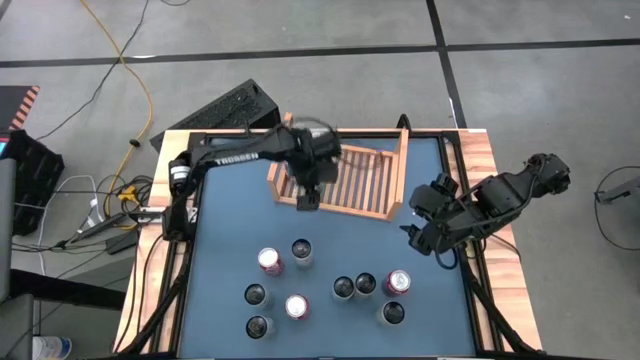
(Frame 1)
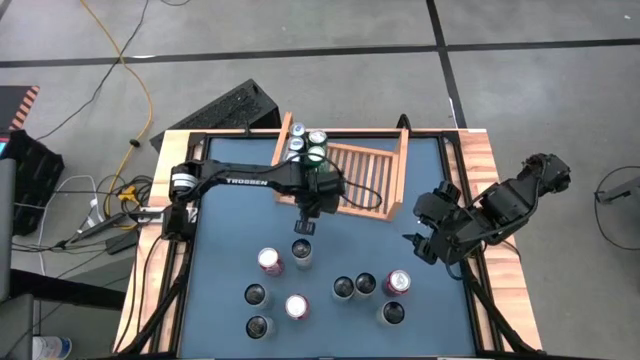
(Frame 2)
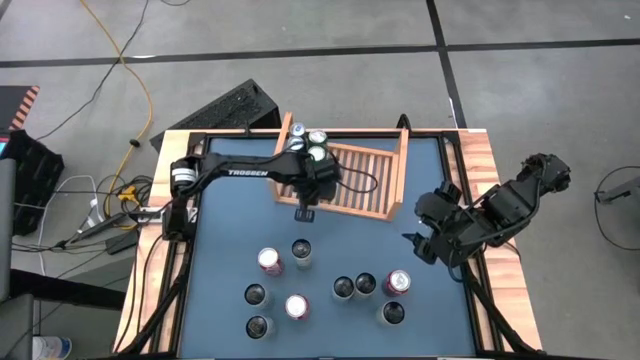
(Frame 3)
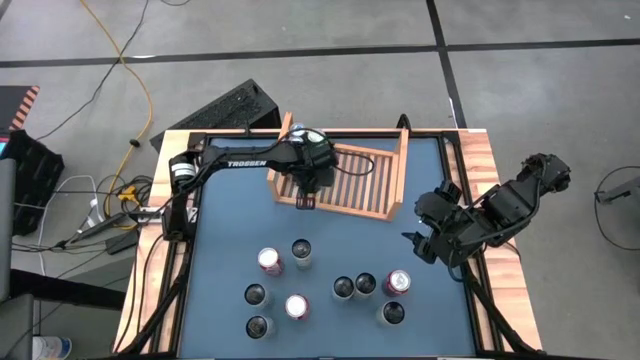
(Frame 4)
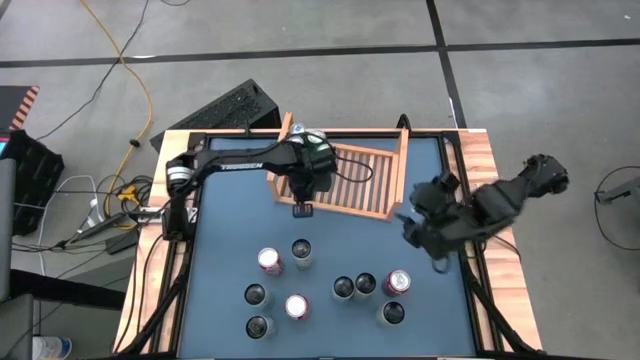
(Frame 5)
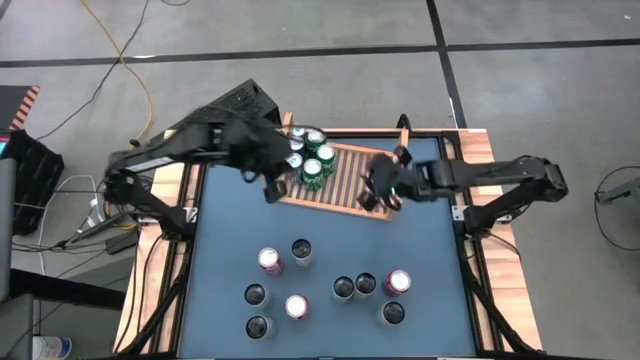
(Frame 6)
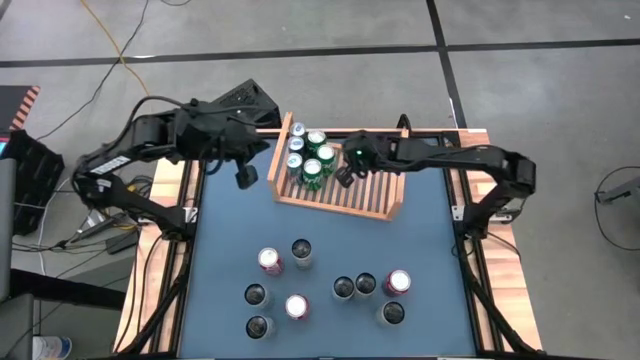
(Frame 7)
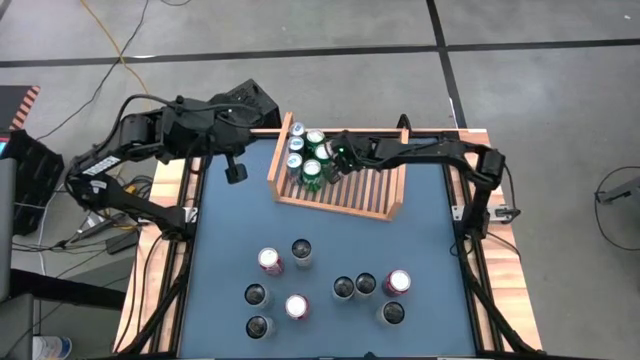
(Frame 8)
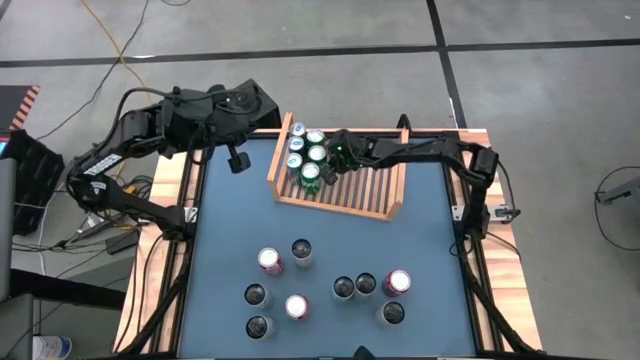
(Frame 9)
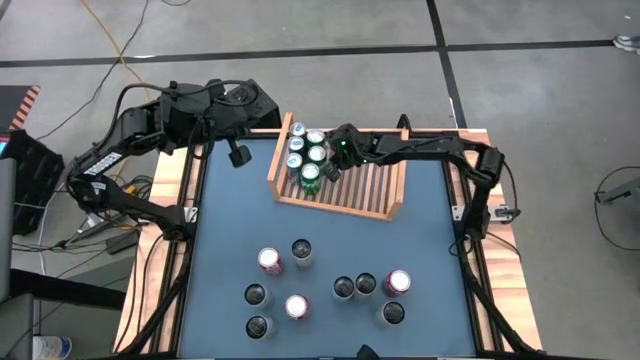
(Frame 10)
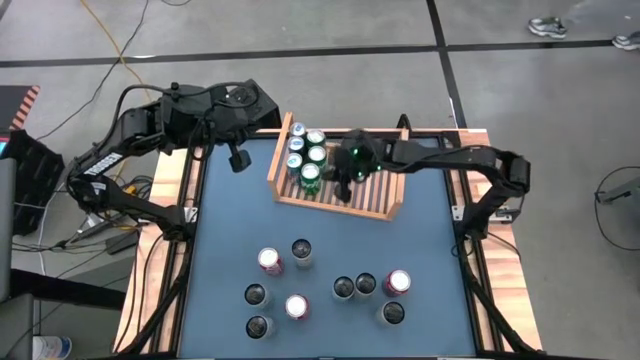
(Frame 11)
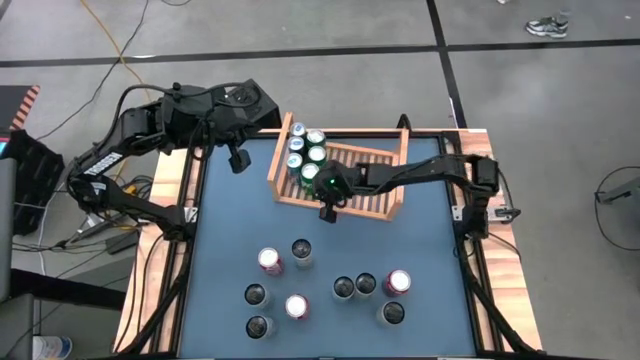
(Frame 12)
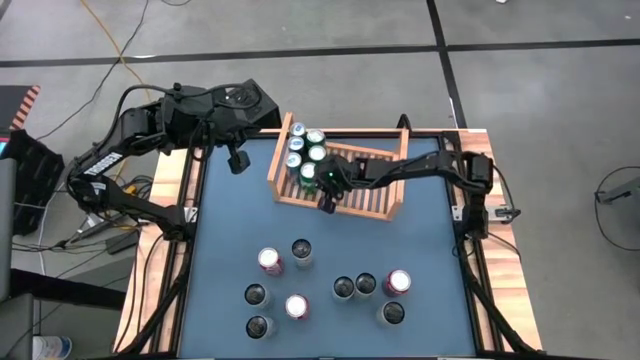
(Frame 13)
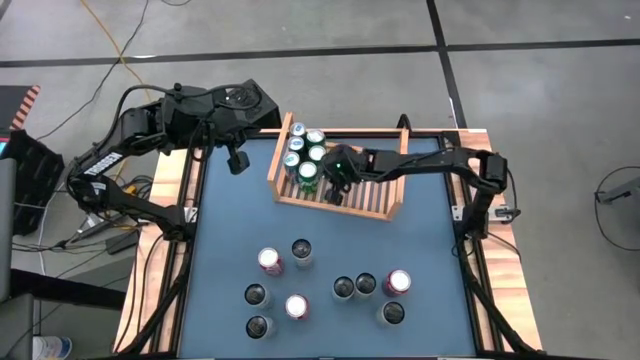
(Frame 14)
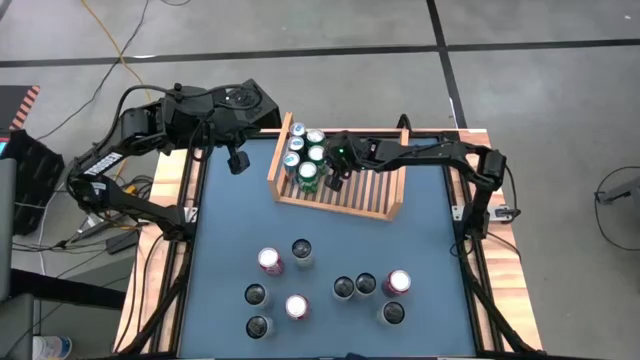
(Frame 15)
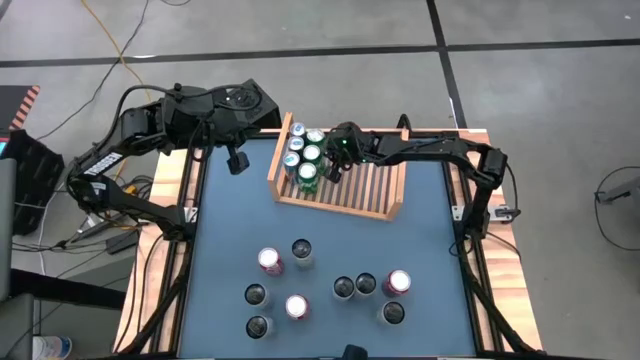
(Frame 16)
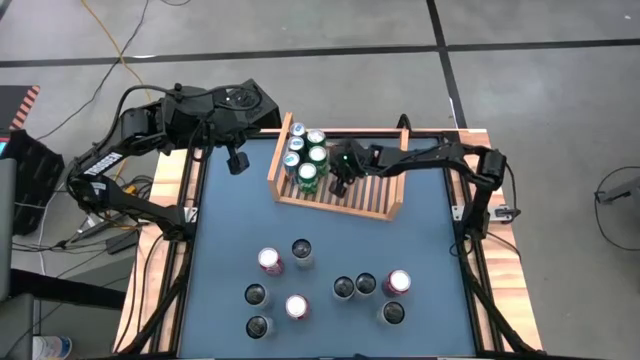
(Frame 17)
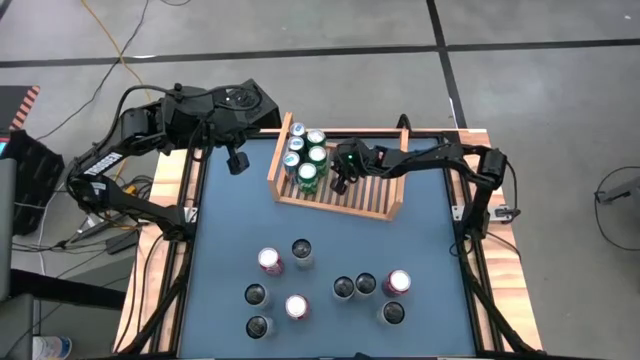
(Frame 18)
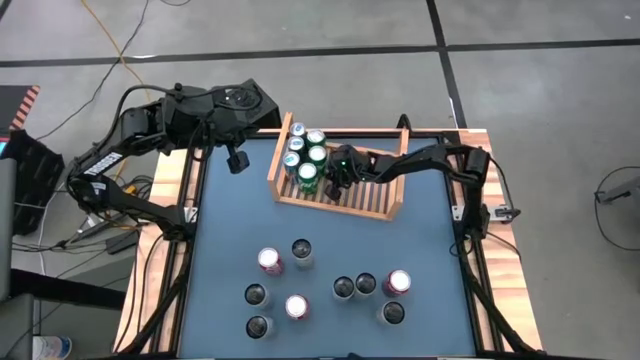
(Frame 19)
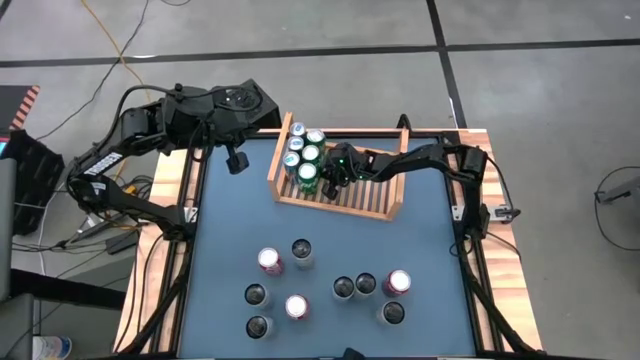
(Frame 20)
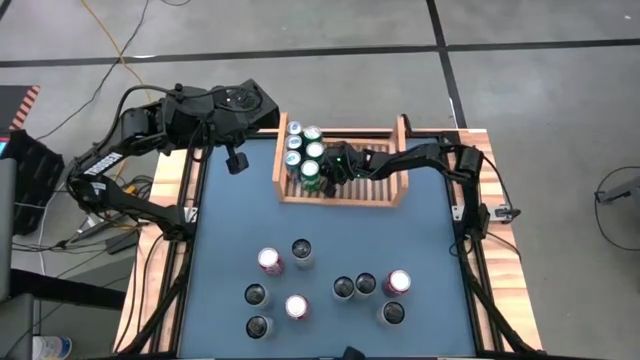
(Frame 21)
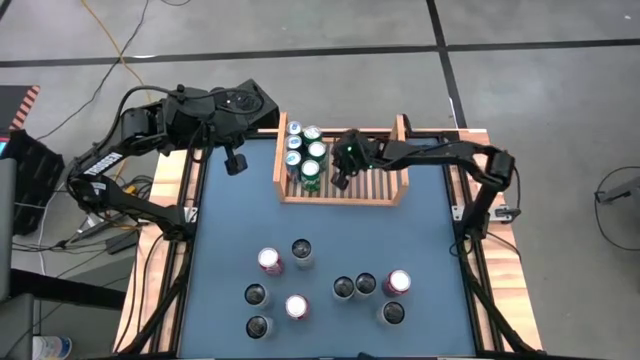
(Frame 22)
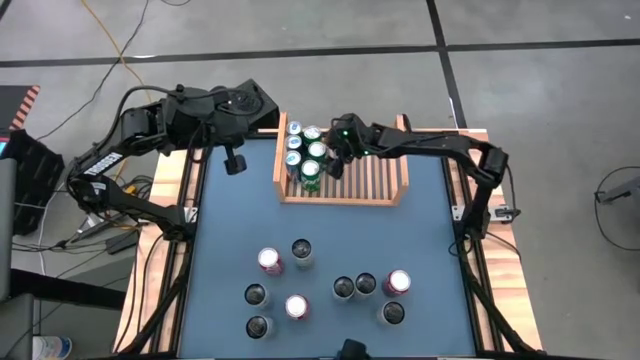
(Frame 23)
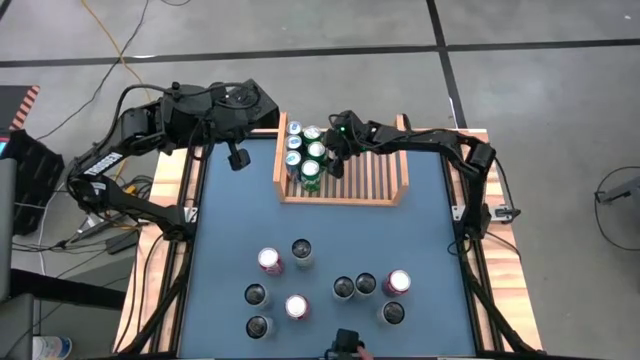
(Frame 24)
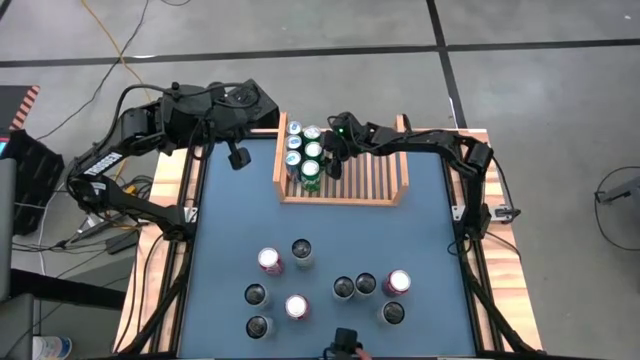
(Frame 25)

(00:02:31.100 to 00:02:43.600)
Task: Place canned beverage on shelf
Adjust the soda cans on the shelf

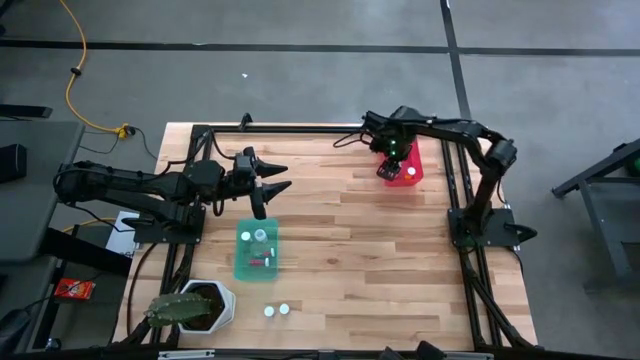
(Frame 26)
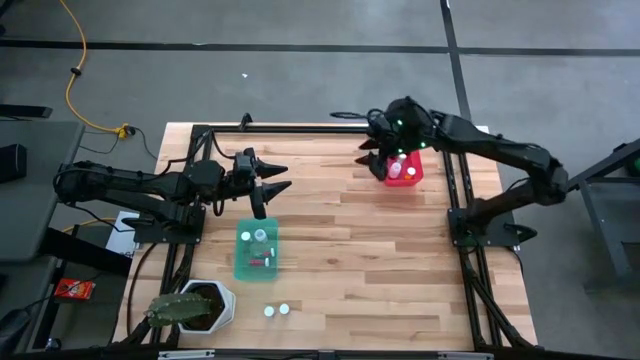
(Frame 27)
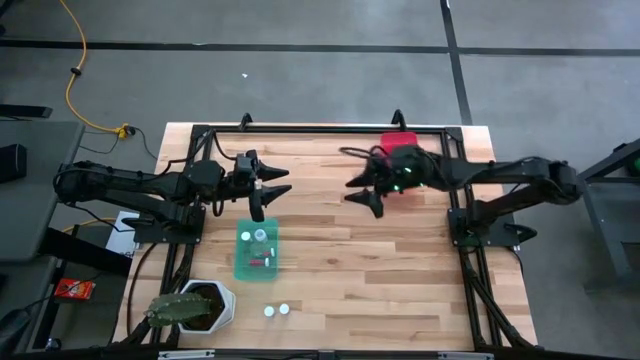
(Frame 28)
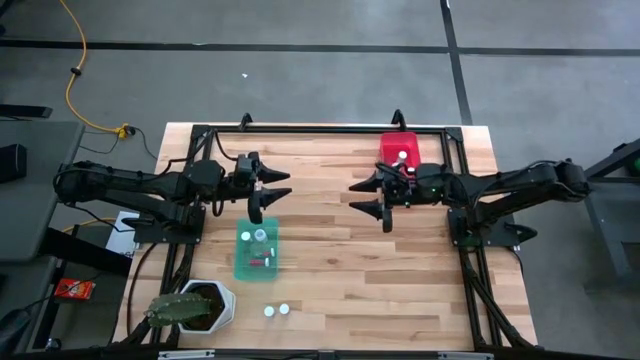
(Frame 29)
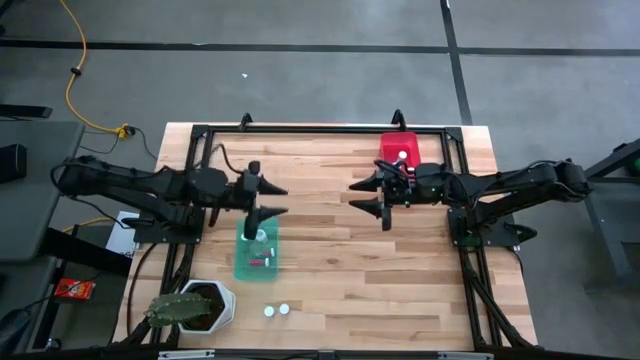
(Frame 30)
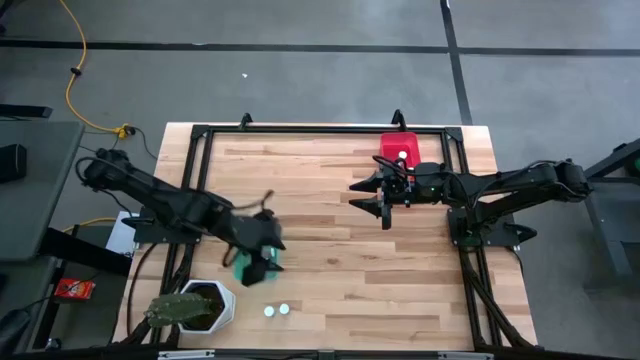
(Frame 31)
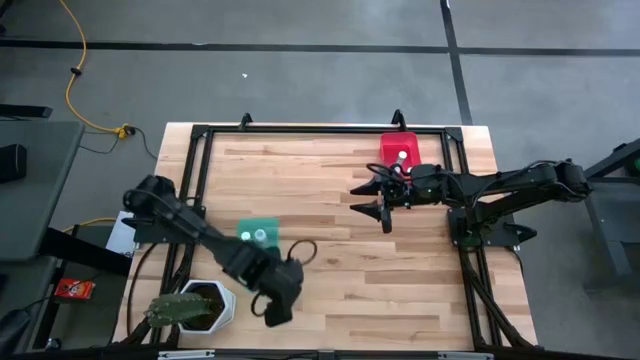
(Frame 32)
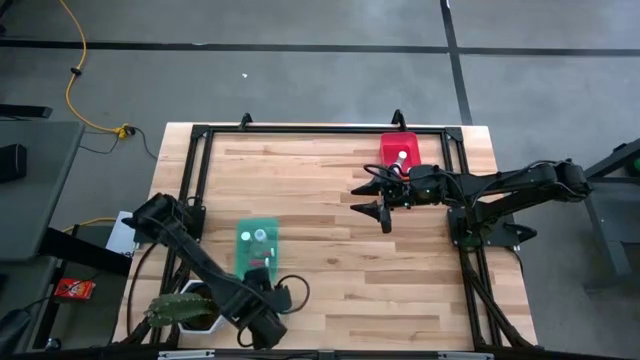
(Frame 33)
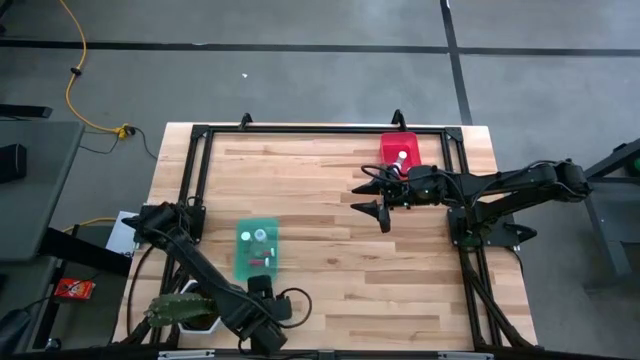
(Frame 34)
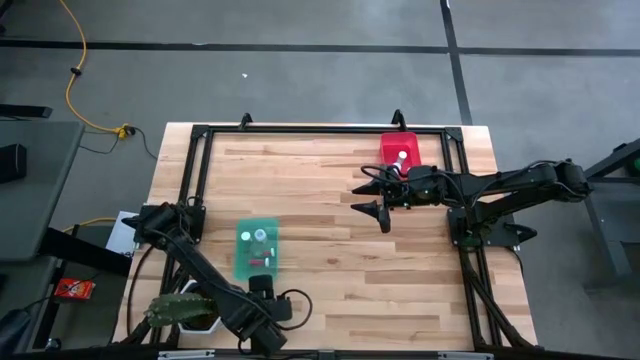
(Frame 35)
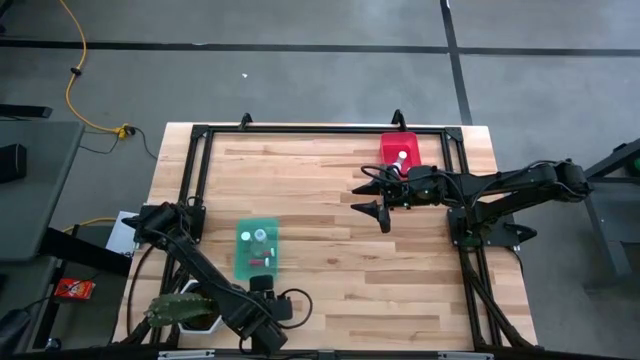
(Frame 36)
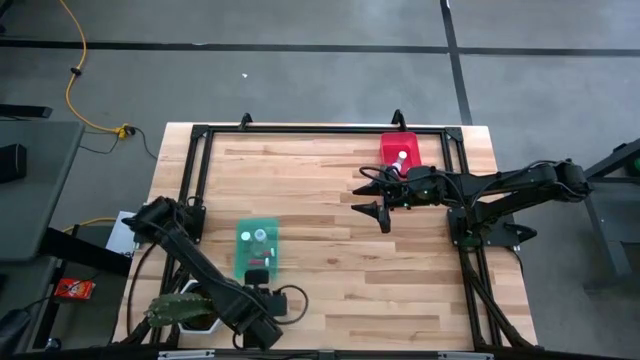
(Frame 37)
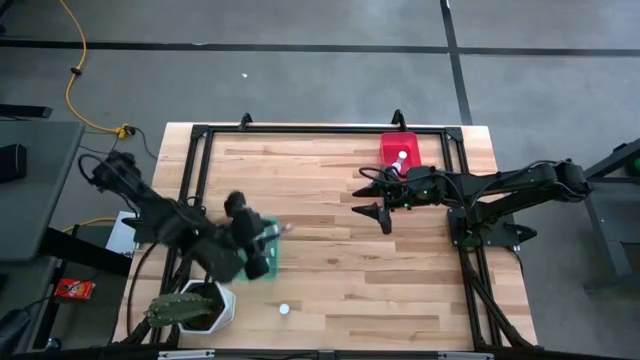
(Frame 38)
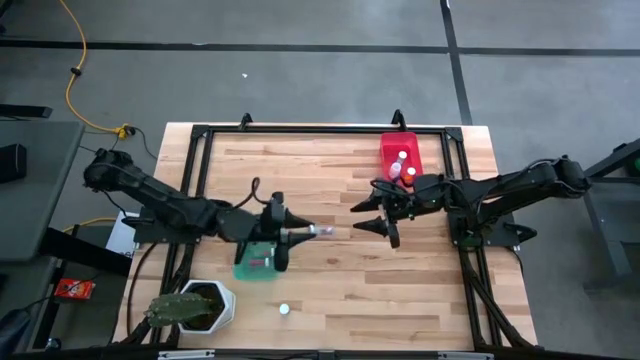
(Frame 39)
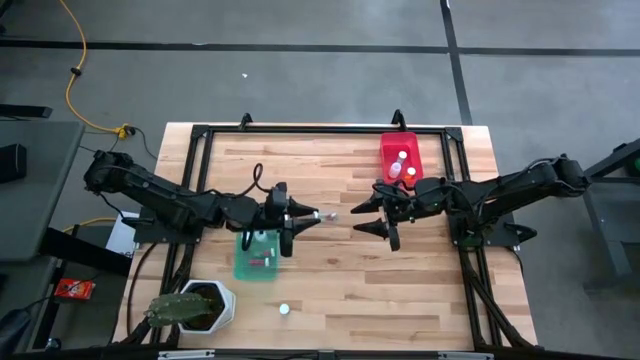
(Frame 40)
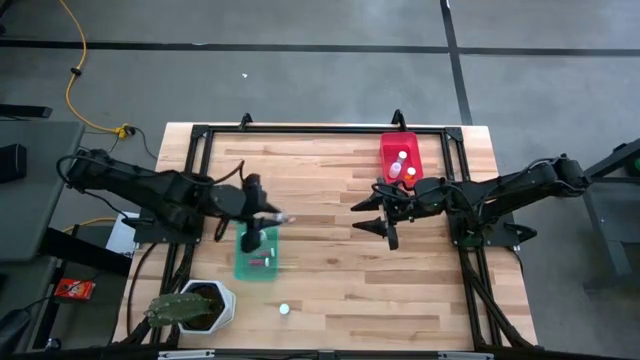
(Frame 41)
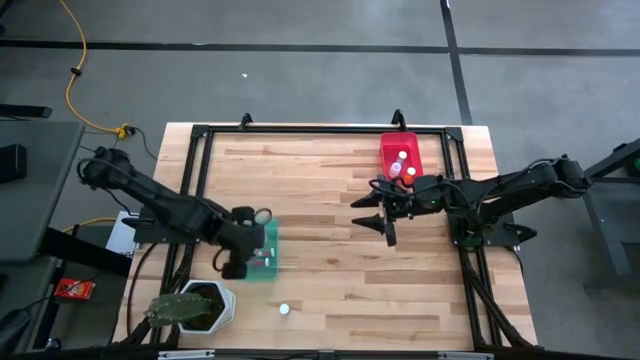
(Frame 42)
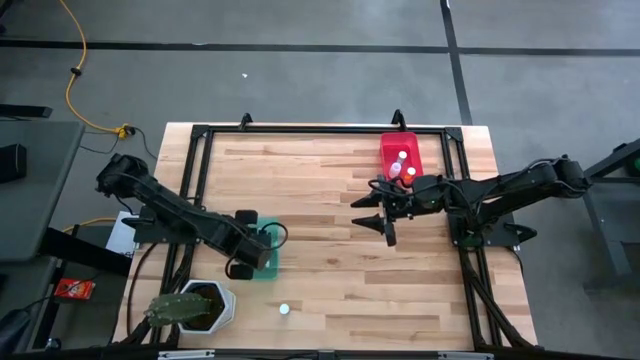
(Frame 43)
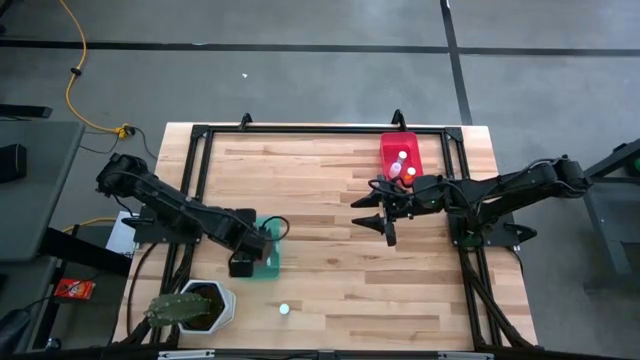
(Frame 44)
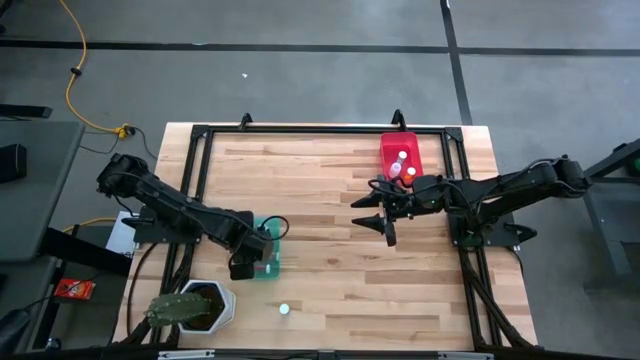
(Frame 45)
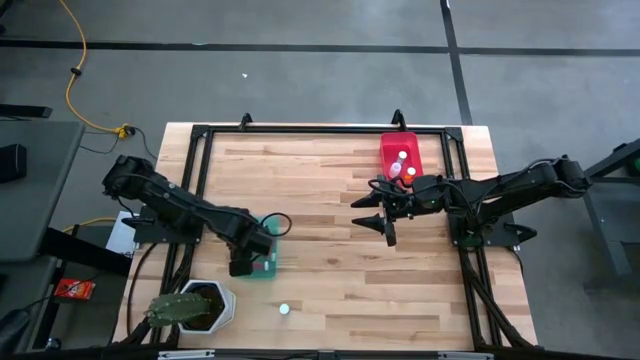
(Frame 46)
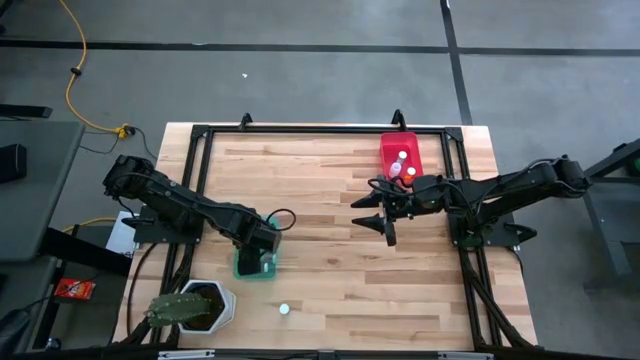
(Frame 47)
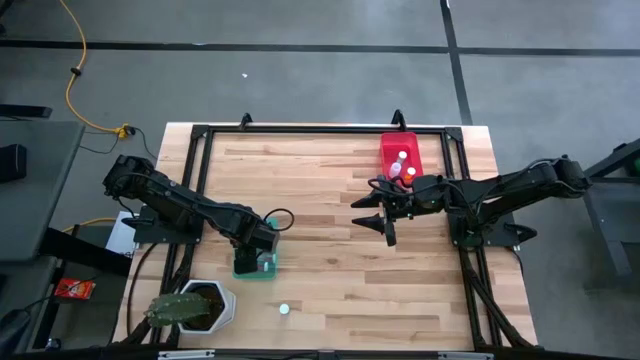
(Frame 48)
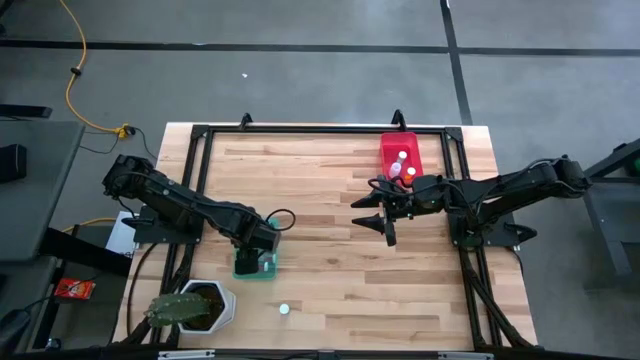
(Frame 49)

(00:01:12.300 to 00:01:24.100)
Task: Pick and place medicine bottles into bin by pill shape (circle, oval)
Put the blue capsule bottle into the blue bin
